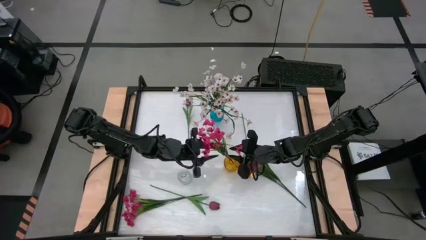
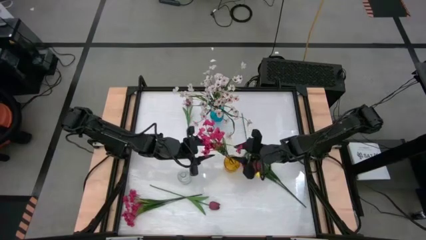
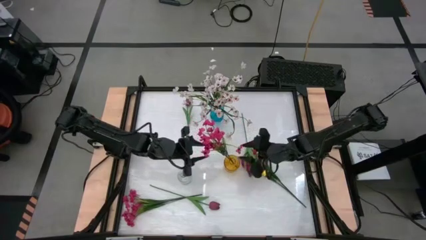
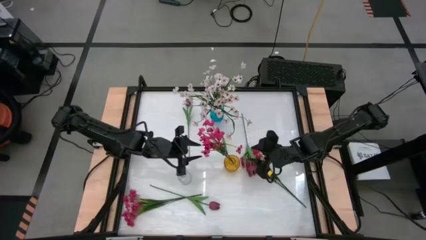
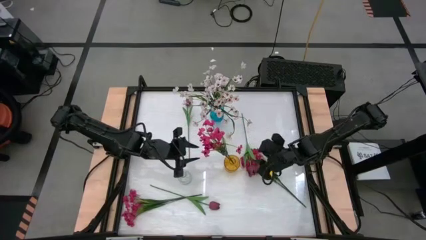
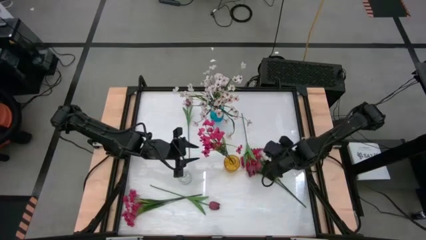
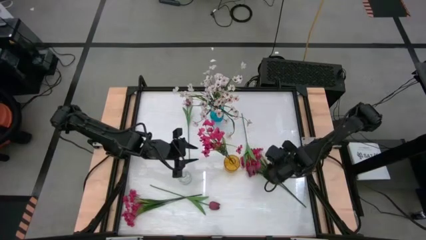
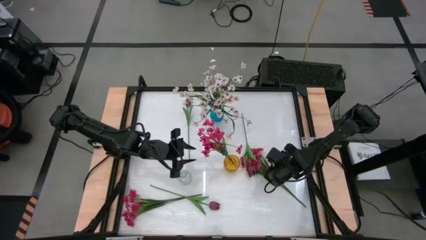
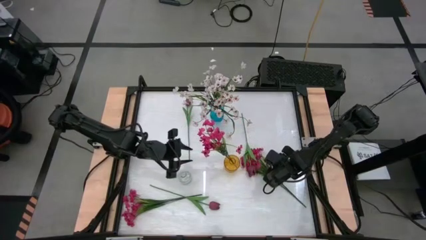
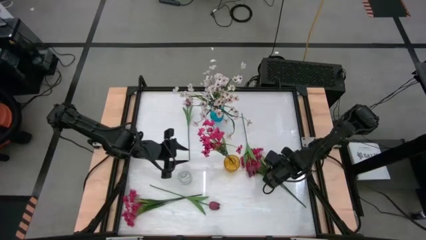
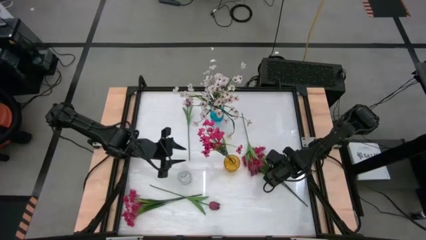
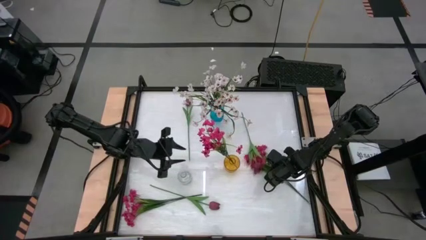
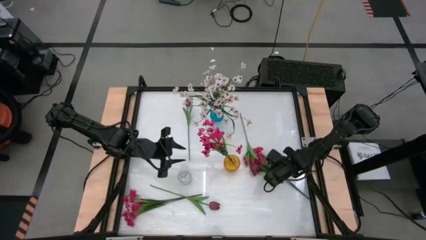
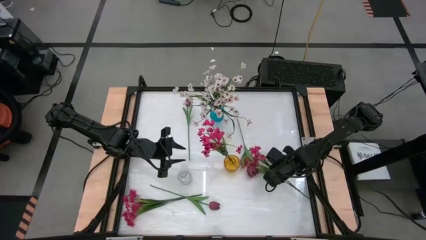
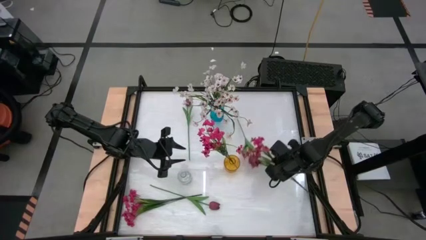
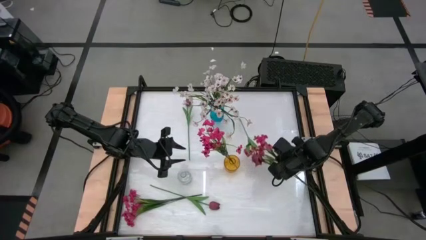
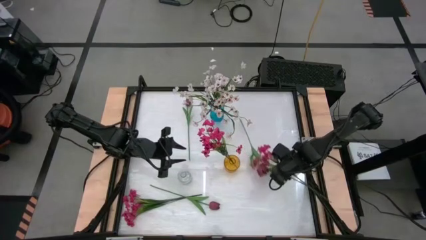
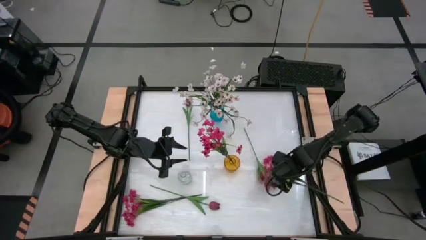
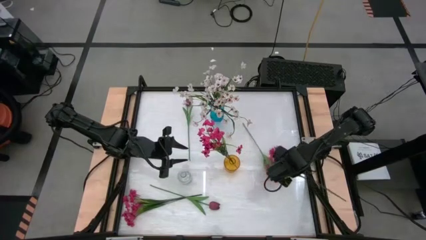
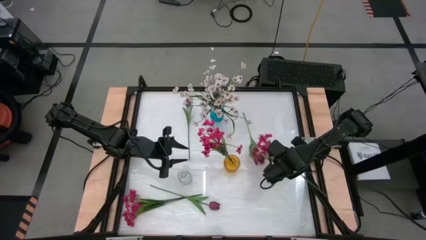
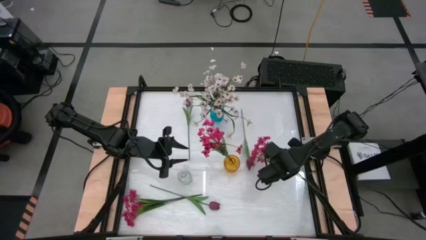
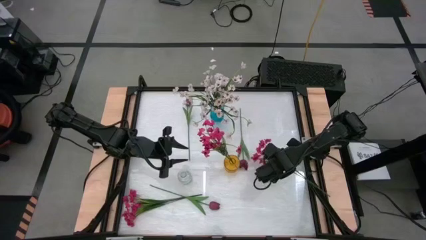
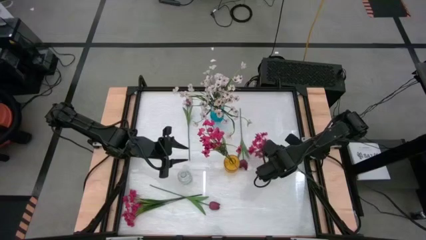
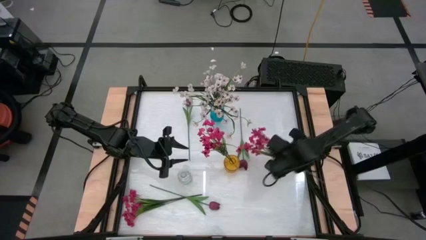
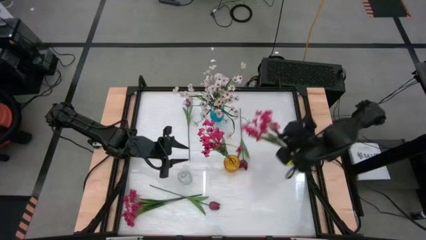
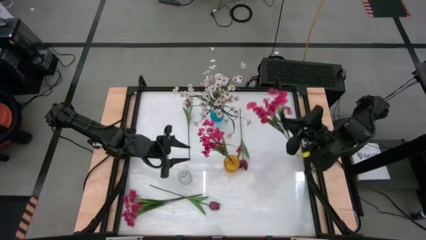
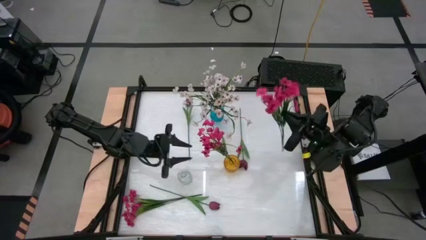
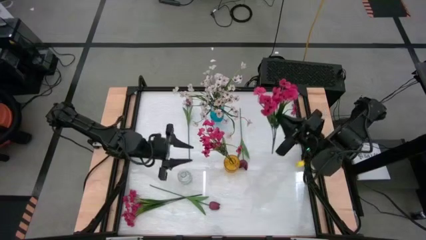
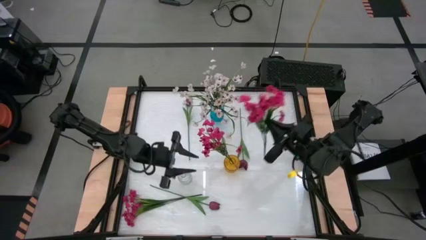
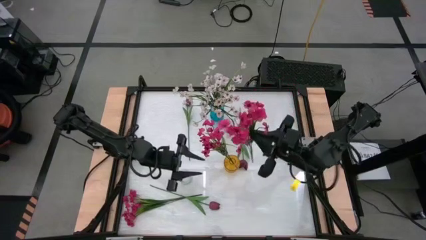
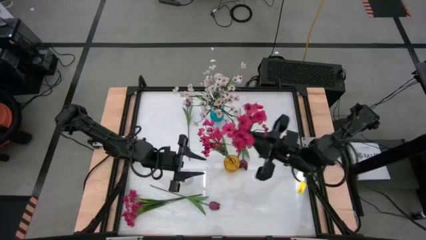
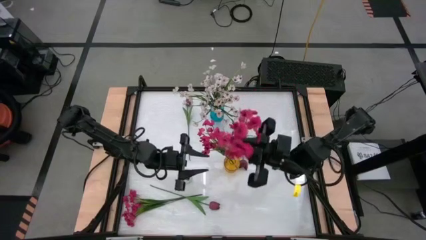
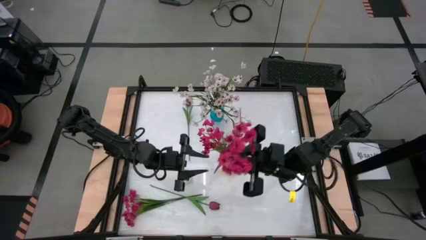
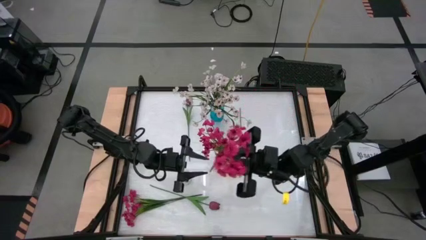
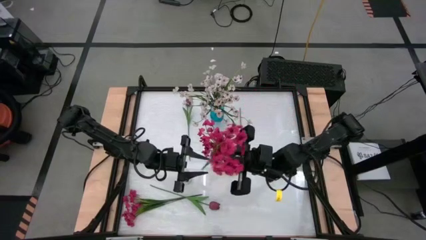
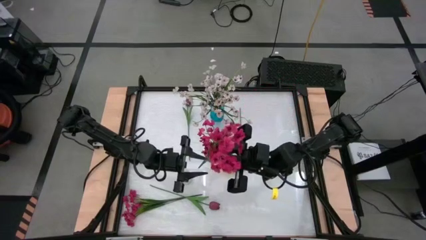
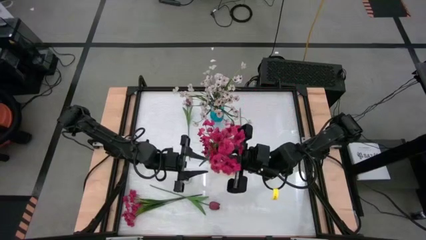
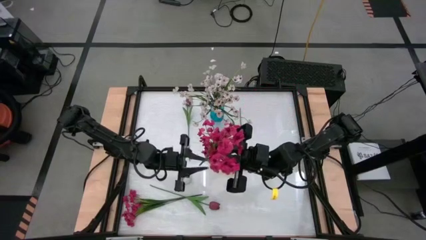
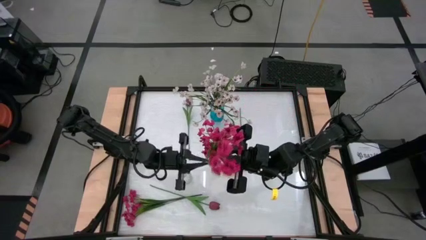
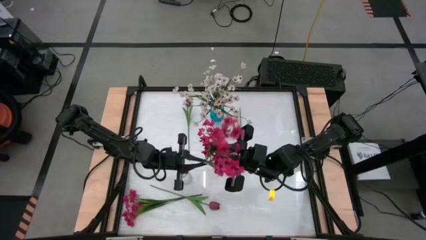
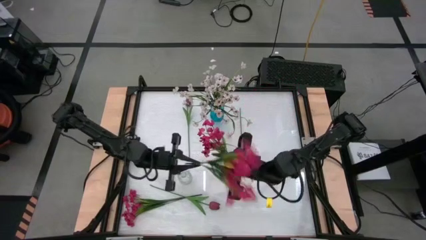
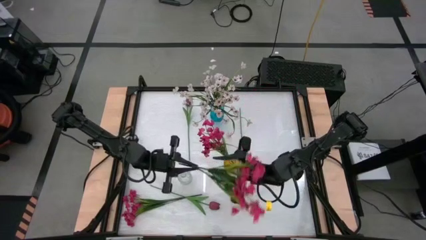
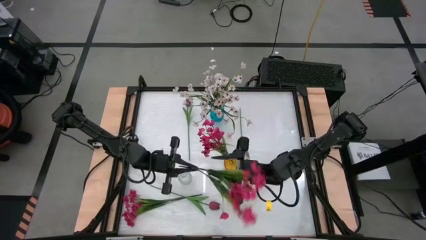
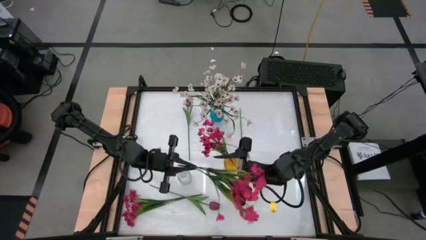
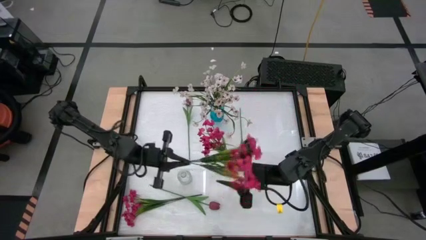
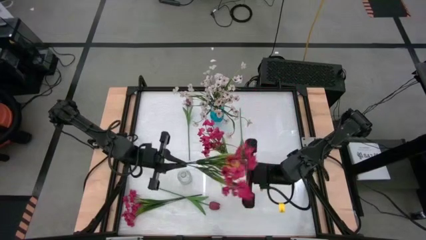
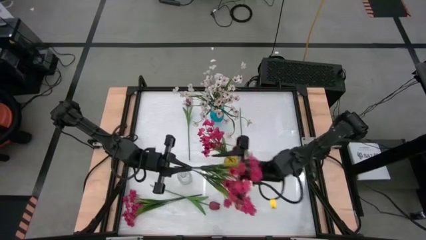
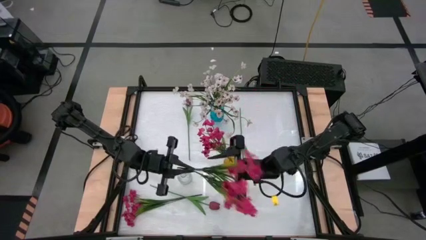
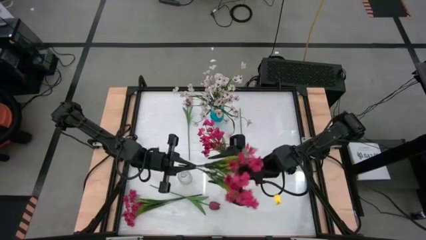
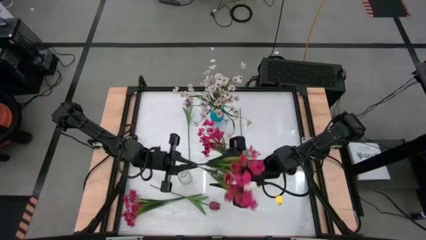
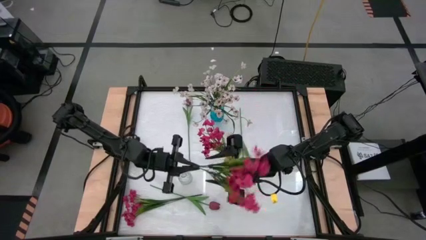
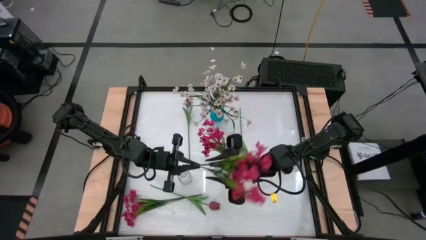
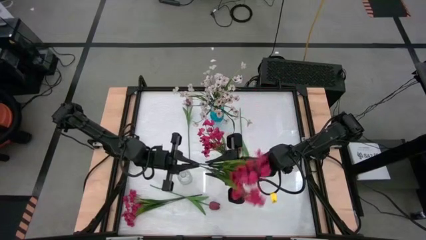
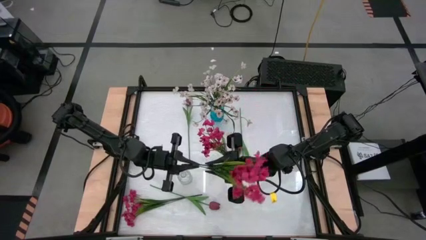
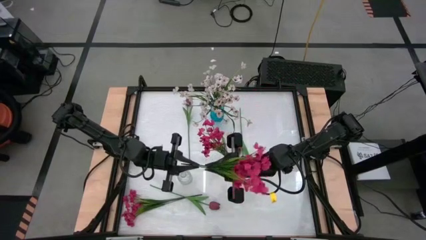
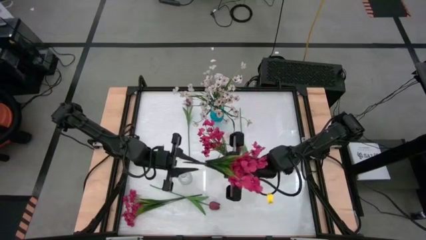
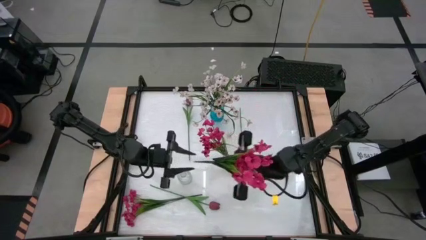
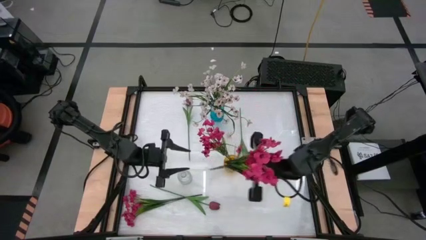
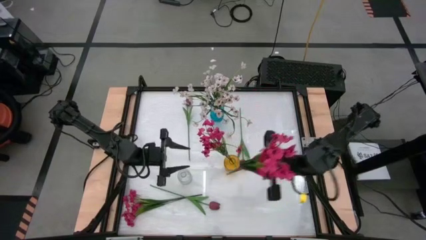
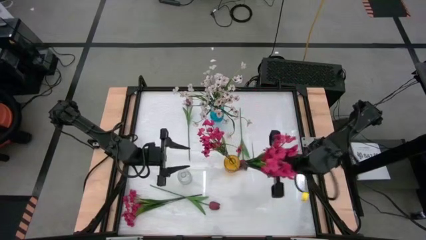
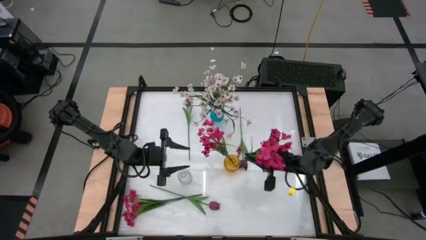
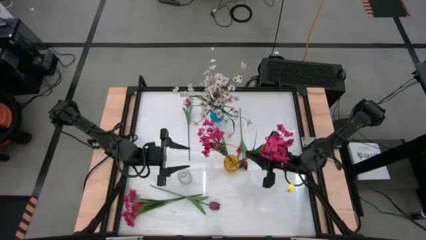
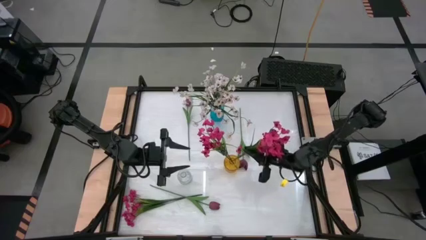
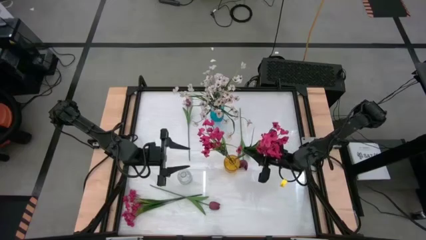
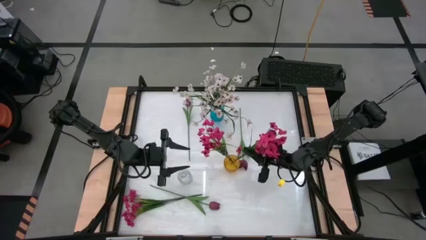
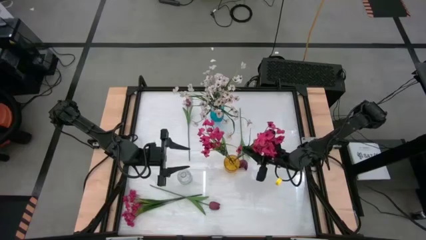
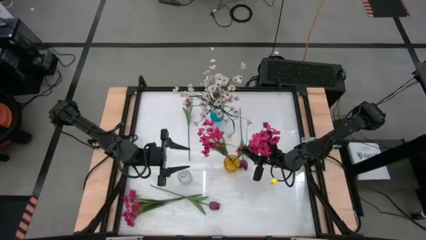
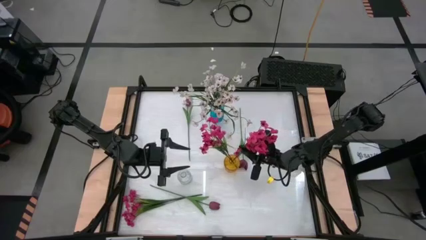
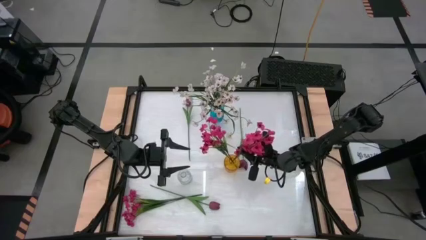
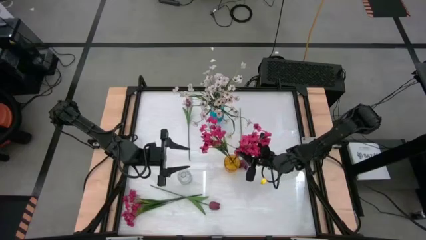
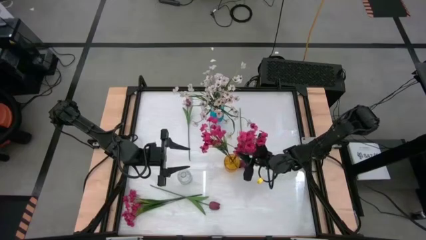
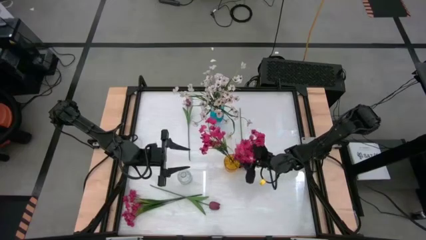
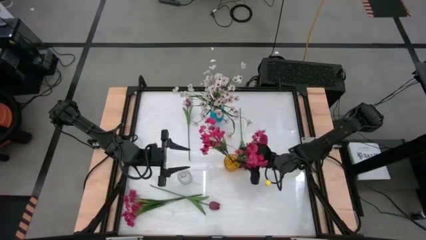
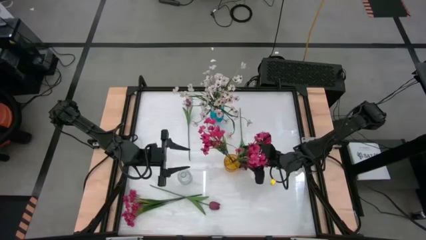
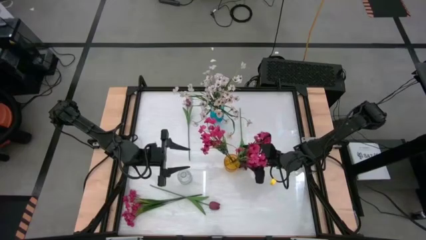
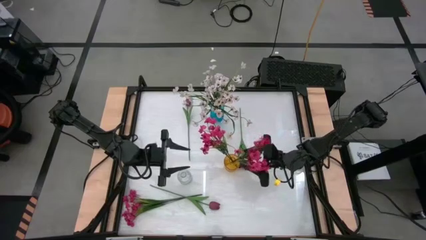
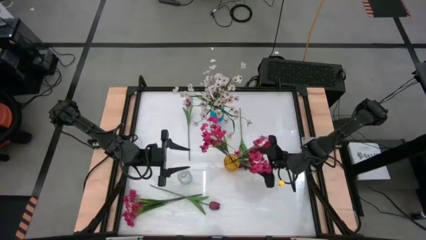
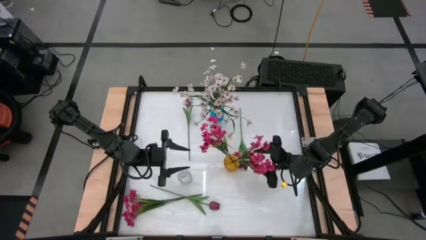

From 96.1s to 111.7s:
Task: Sort flowers into vase by color
Put the right pink flowers into the yellow vase
